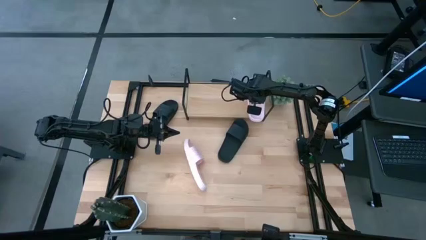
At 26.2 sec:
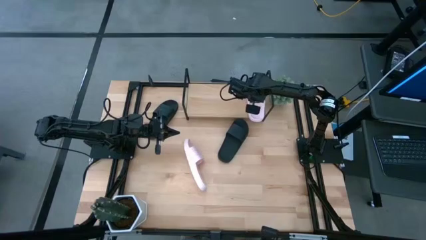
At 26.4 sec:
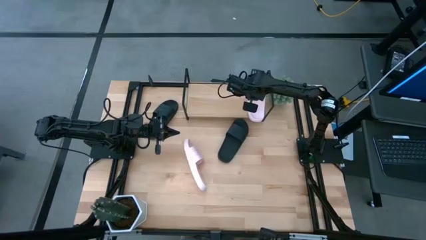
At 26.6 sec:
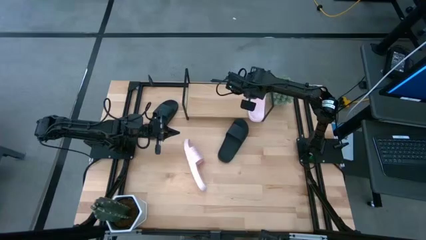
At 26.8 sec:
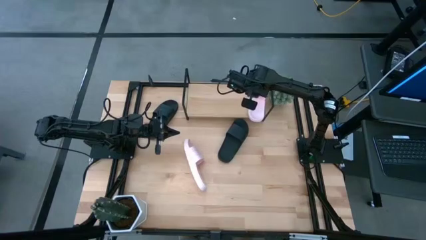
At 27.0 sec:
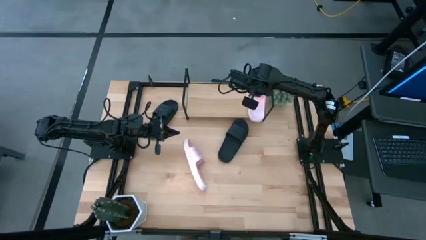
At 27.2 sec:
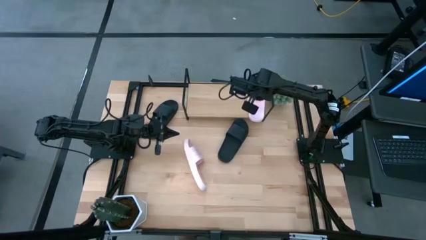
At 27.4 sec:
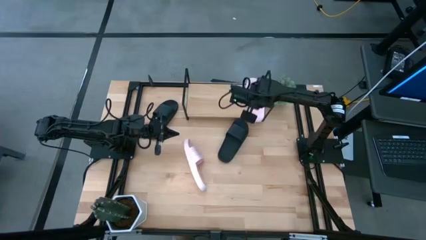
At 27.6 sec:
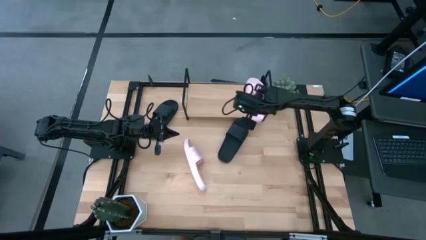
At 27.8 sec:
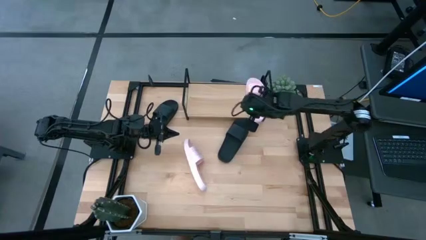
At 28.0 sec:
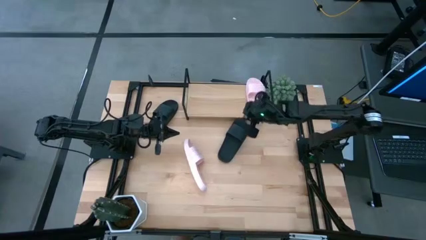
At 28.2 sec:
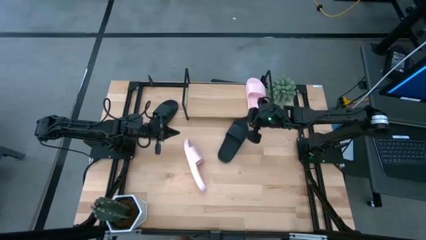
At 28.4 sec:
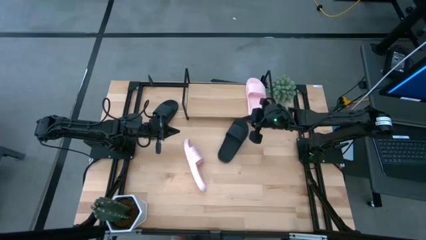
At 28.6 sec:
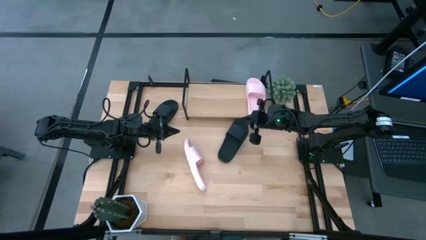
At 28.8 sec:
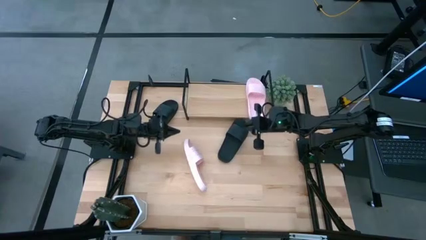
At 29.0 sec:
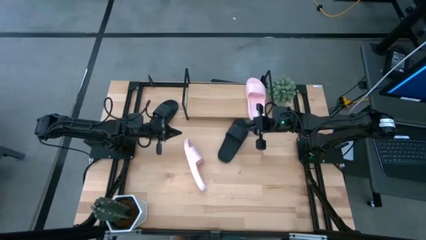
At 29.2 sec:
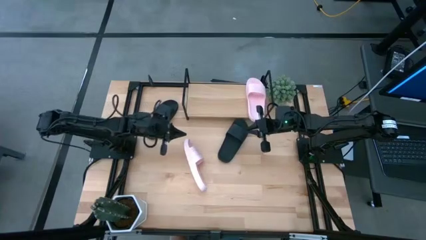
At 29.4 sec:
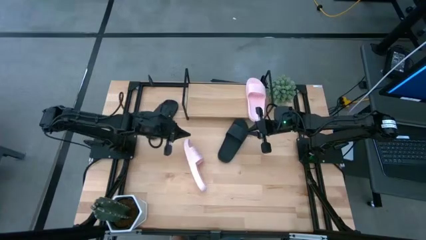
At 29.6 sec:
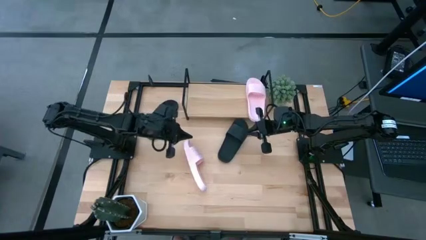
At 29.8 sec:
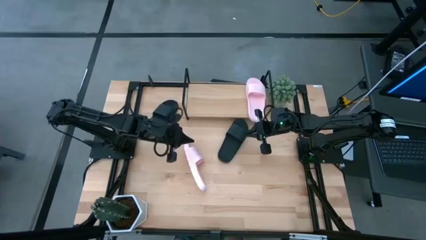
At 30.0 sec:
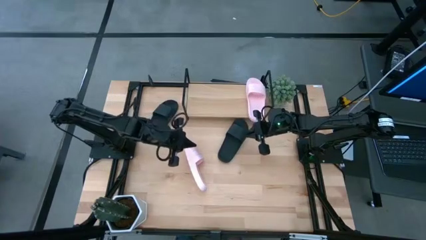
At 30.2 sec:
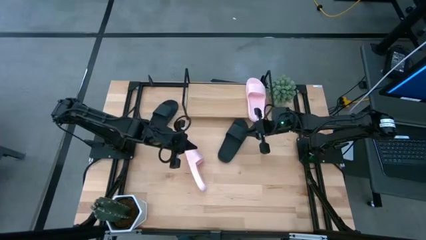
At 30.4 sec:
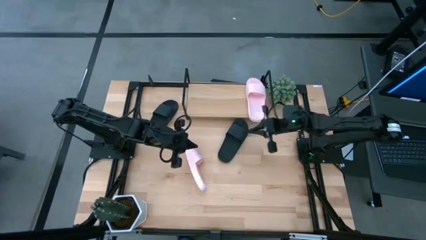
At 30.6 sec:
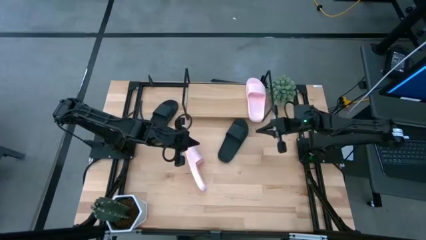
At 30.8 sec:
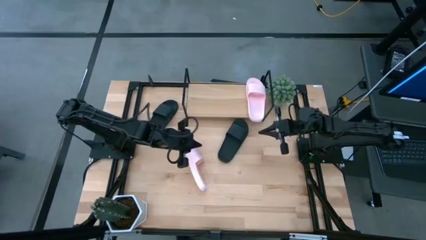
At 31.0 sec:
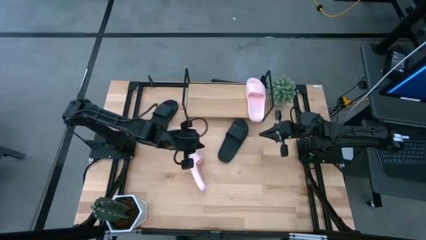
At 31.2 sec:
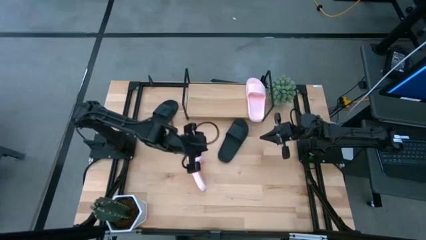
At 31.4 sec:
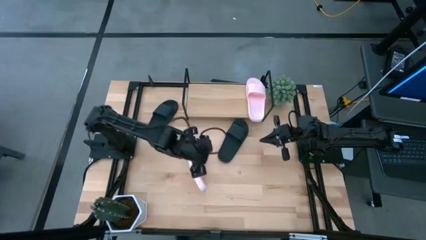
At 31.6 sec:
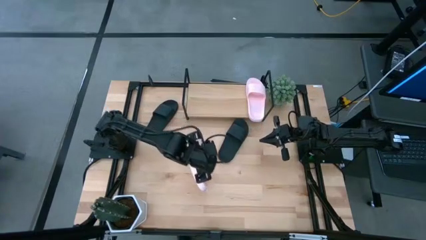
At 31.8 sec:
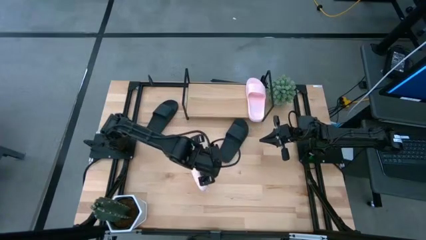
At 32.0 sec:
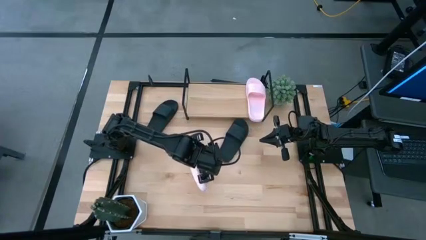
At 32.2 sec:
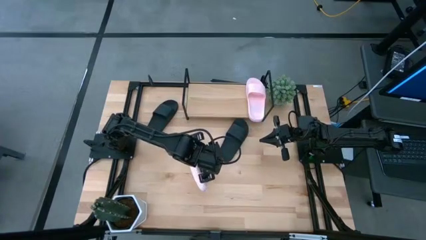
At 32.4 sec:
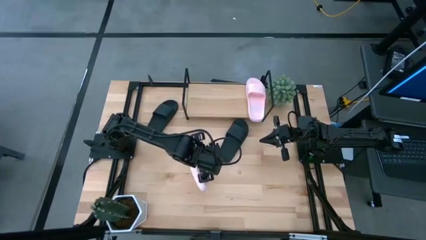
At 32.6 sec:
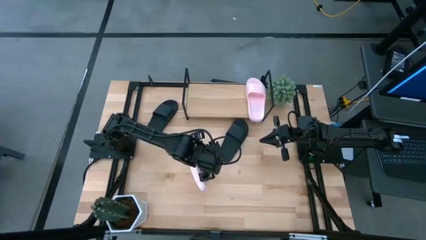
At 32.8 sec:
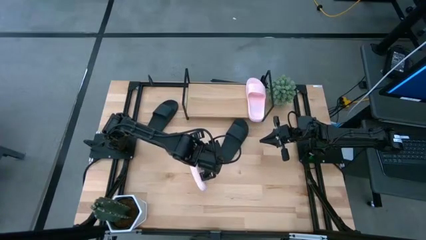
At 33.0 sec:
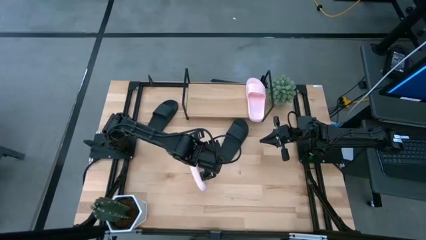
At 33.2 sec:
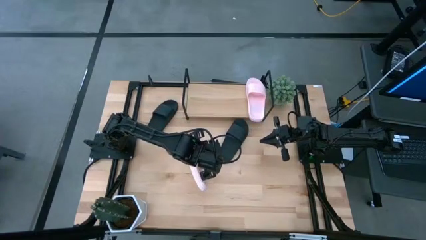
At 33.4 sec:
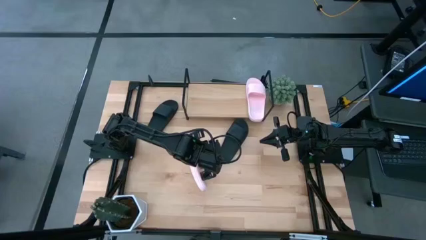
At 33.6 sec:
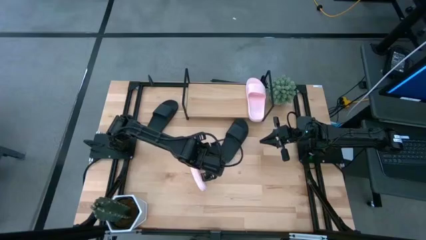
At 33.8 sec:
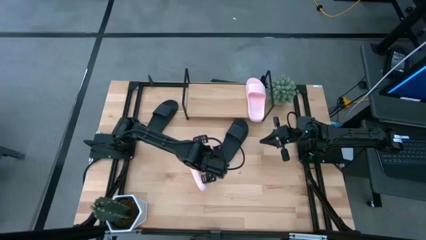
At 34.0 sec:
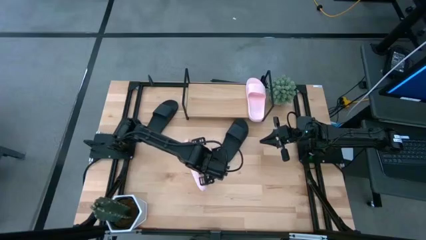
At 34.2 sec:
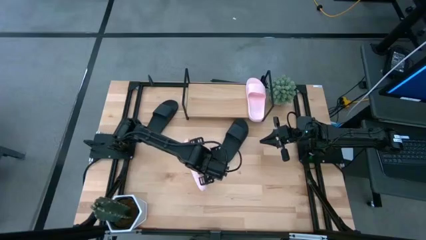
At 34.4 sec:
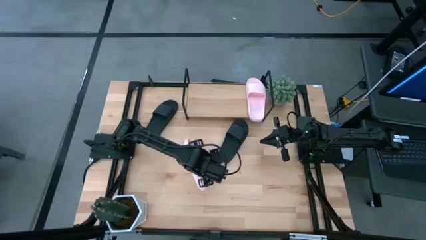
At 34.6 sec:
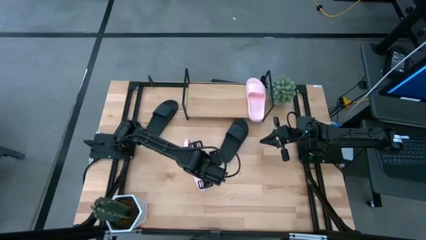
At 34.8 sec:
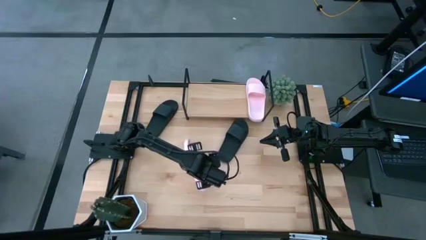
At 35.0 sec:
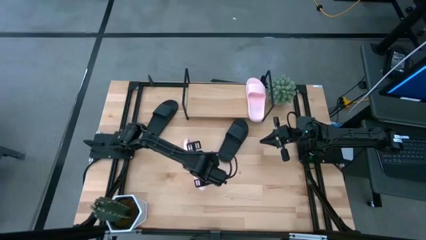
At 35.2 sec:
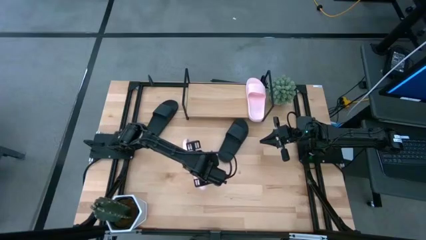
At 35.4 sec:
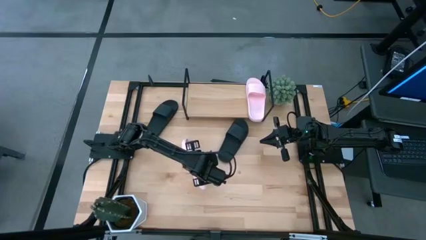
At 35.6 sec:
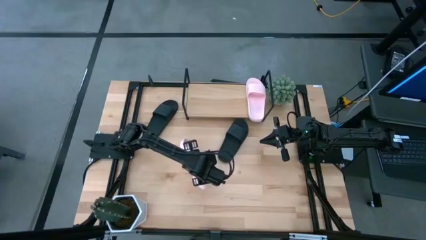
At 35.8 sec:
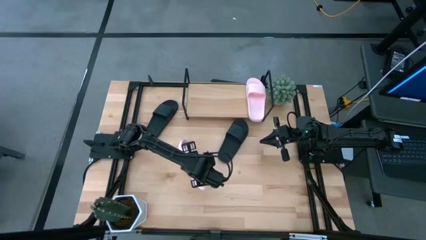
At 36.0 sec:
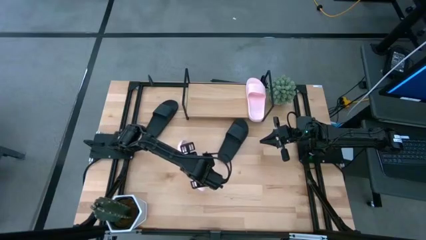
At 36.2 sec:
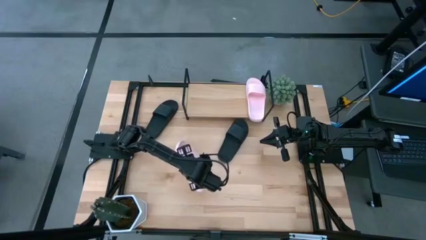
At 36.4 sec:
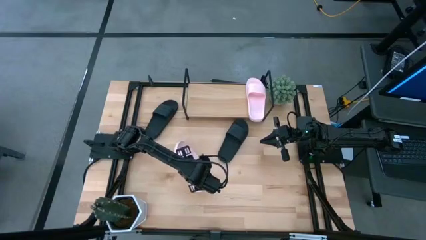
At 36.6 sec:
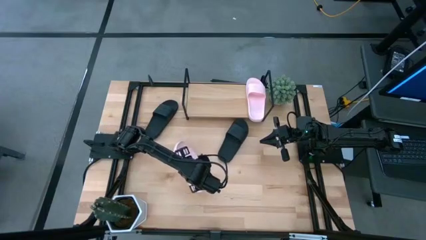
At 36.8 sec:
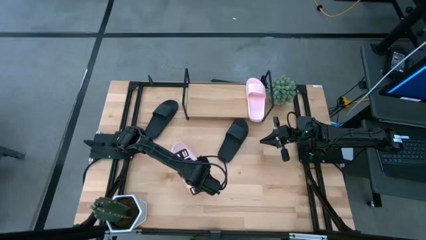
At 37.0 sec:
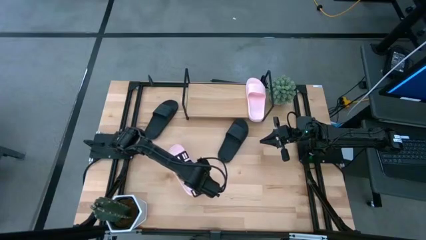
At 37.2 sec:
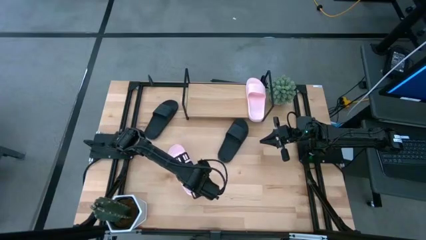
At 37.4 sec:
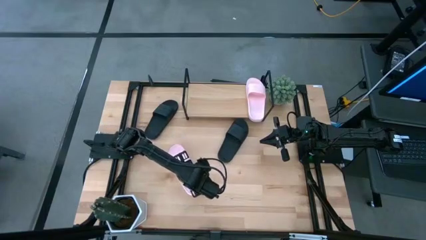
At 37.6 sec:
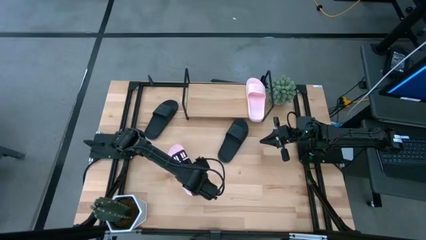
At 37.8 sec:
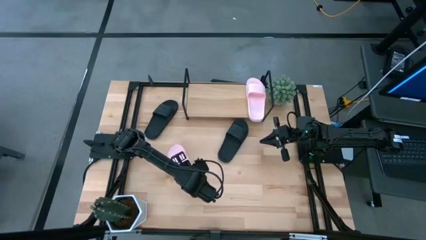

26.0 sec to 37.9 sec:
Task: Pick and place slides into the shelf
Put the pink slipper on the shelf

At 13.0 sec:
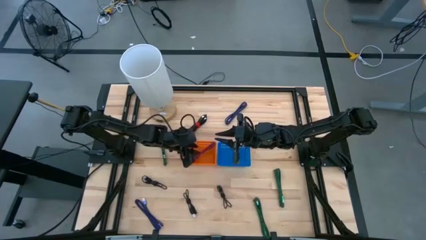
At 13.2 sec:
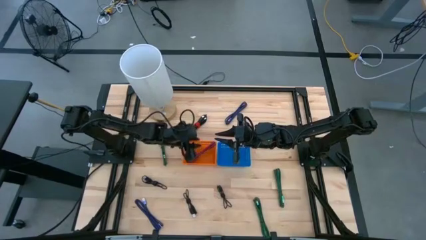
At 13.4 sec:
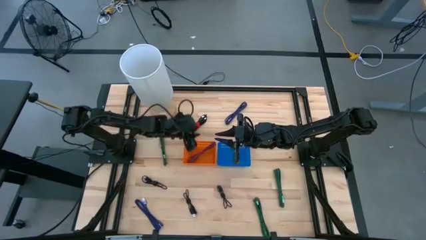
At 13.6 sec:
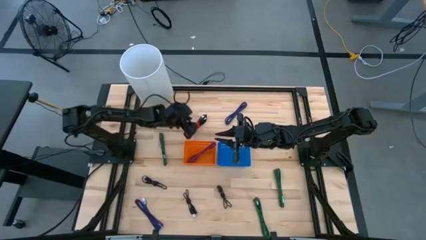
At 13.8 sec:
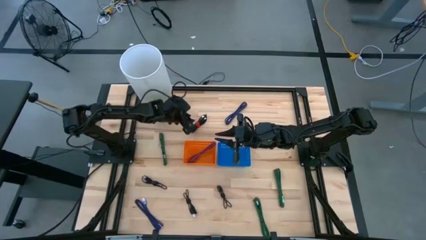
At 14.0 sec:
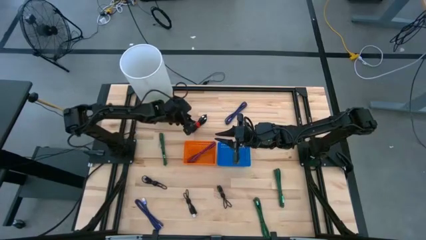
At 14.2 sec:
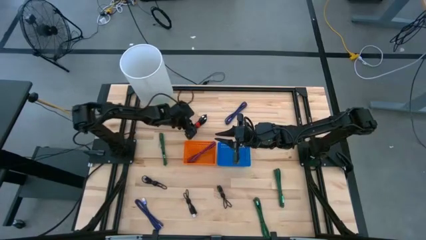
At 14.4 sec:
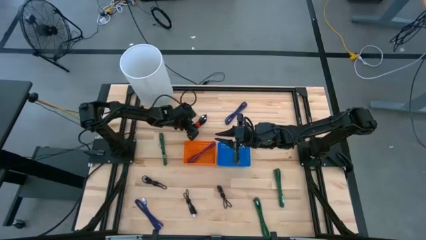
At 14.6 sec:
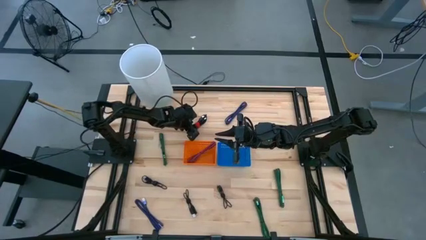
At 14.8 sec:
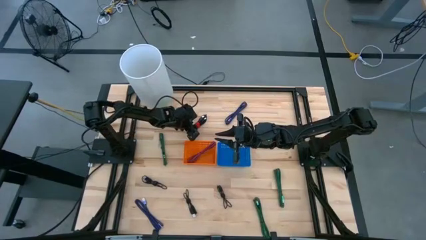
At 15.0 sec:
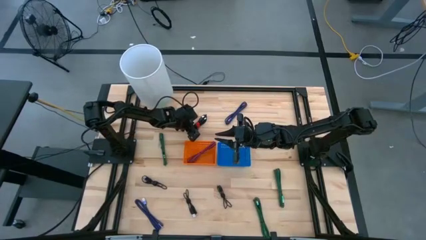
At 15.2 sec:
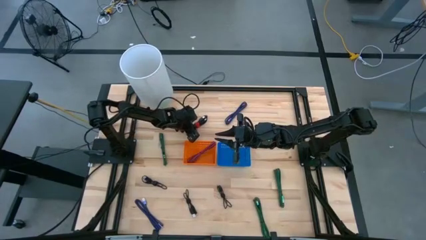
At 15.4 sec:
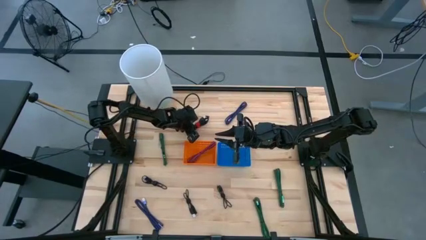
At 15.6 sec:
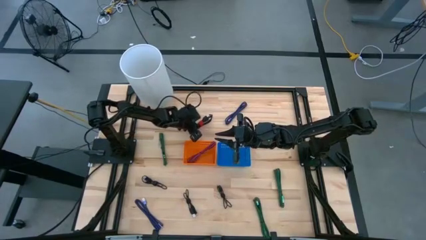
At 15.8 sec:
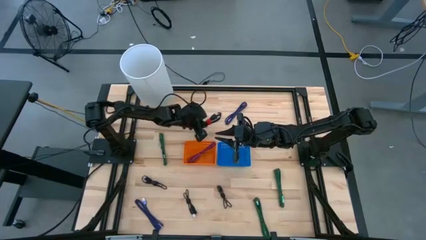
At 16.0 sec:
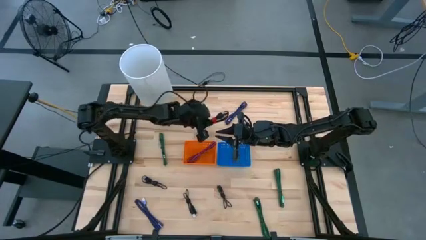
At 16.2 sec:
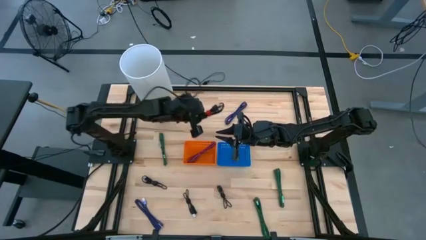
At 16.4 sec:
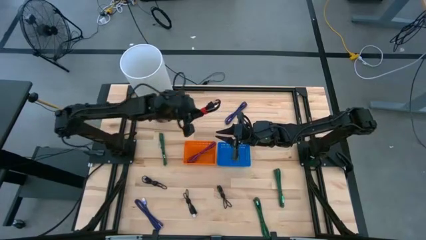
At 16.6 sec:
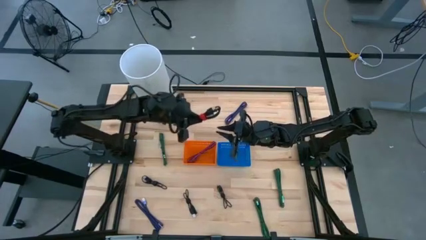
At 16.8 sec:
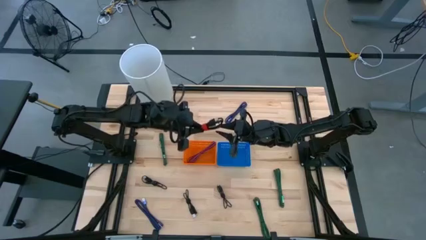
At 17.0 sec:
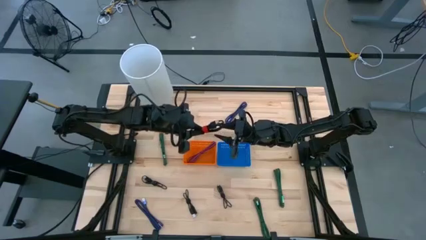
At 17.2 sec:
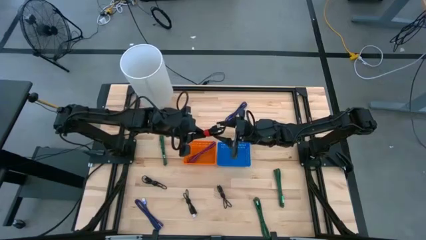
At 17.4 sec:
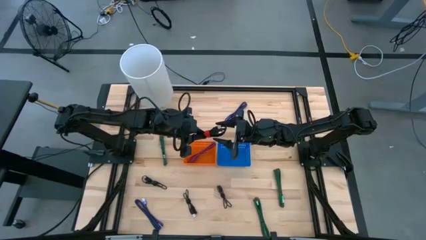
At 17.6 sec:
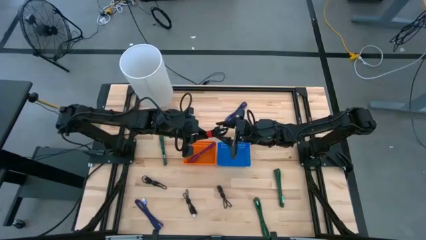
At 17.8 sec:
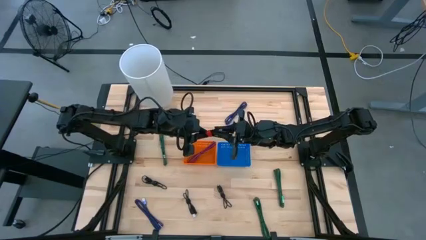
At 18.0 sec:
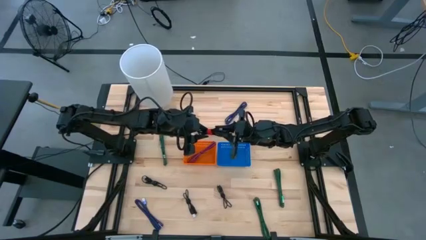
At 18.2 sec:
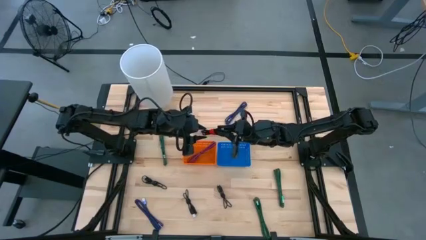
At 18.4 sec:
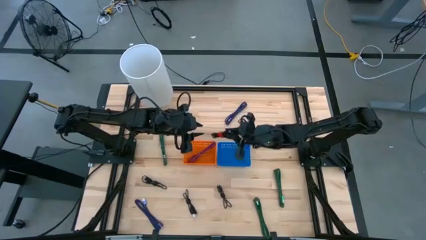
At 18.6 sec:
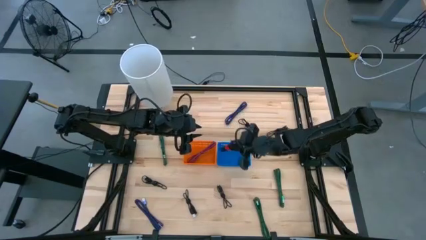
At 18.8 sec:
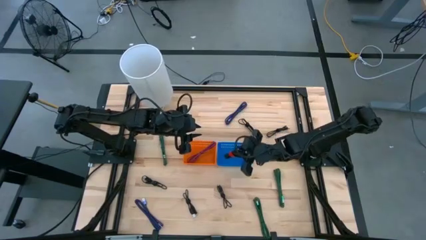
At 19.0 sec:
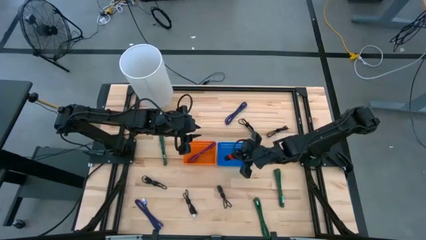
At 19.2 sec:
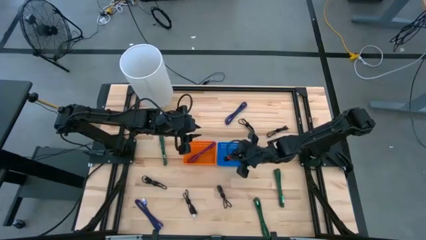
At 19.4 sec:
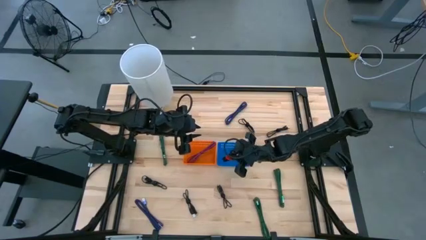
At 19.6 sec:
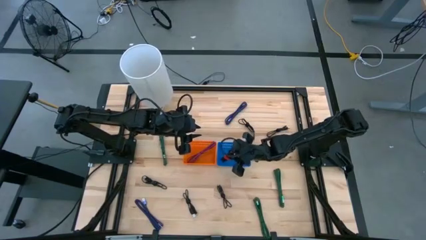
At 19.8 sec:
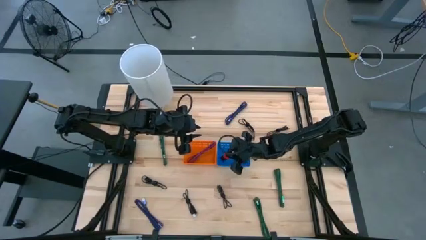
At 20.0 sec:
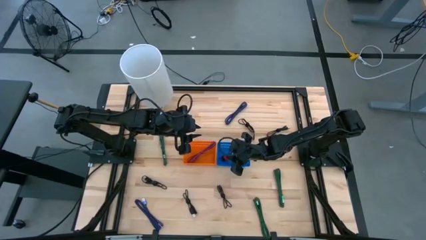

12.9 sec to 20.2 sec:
Task: Pick & Place USB Port
Put the black charger cable into the blue bin
